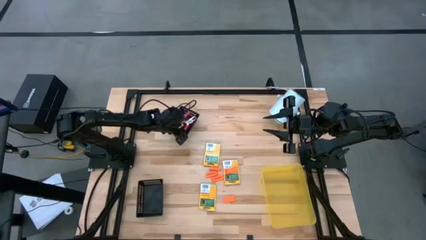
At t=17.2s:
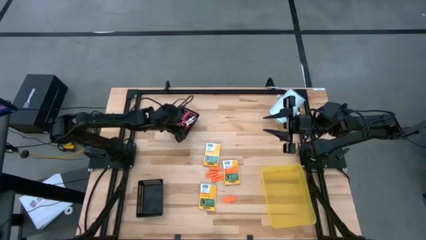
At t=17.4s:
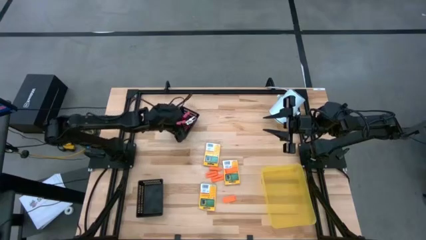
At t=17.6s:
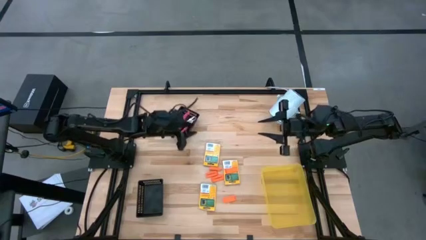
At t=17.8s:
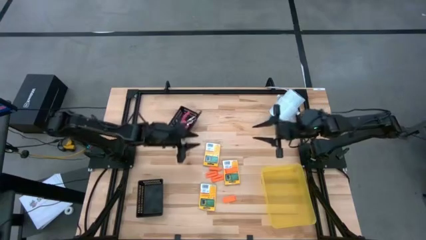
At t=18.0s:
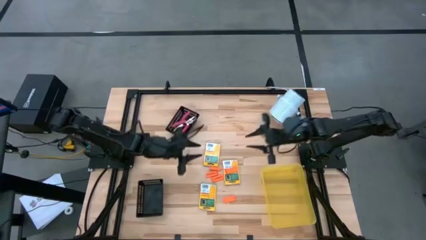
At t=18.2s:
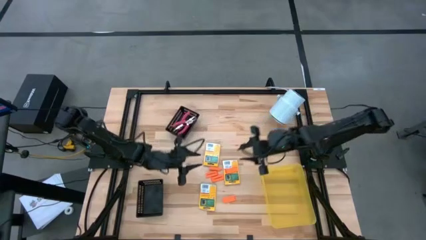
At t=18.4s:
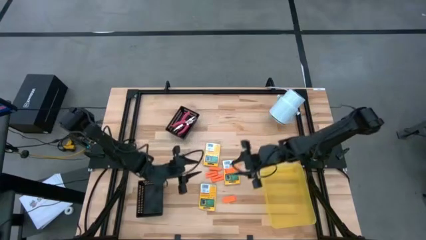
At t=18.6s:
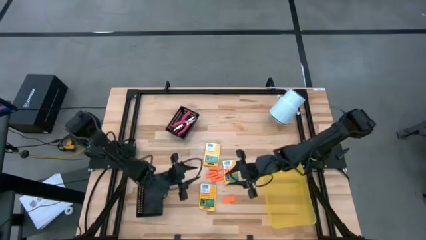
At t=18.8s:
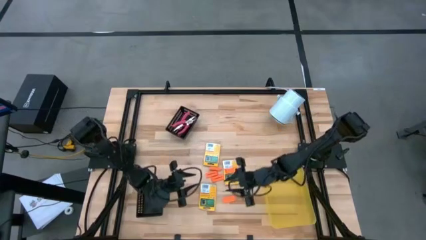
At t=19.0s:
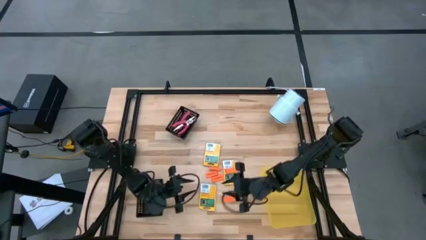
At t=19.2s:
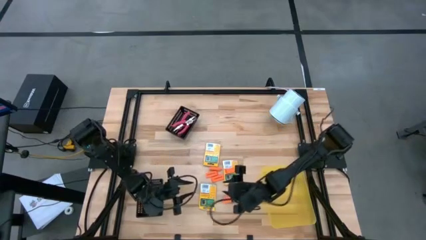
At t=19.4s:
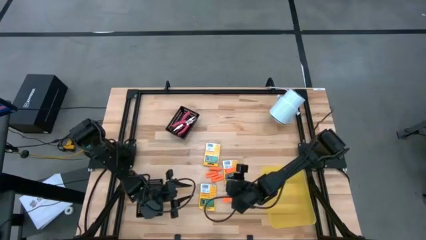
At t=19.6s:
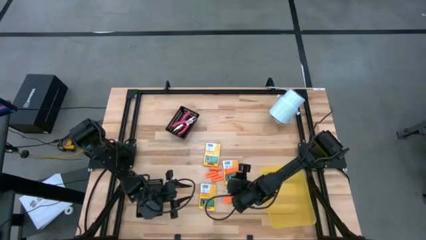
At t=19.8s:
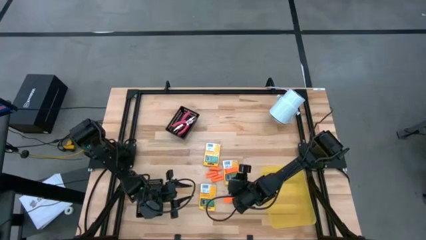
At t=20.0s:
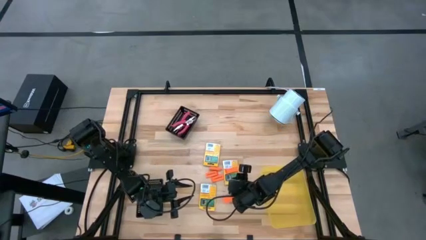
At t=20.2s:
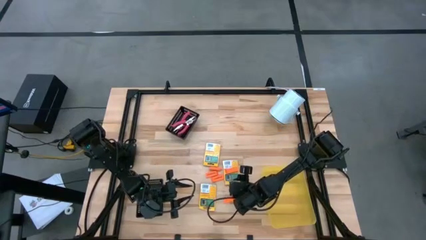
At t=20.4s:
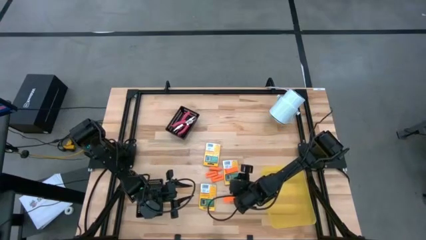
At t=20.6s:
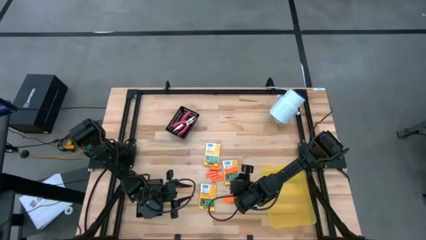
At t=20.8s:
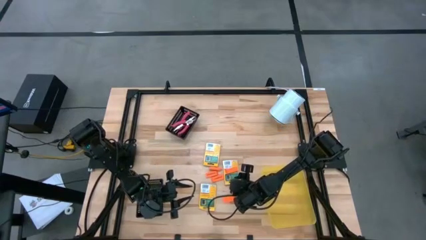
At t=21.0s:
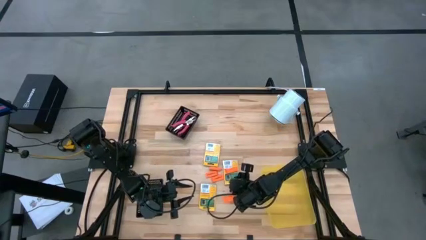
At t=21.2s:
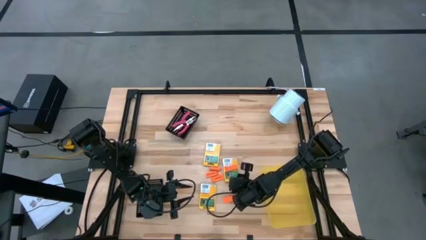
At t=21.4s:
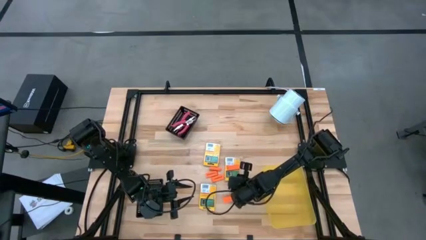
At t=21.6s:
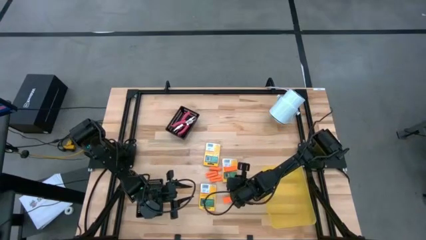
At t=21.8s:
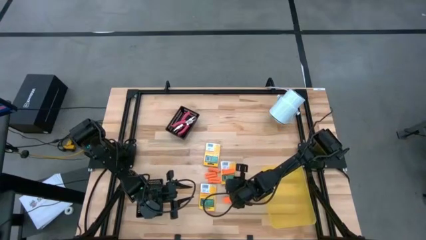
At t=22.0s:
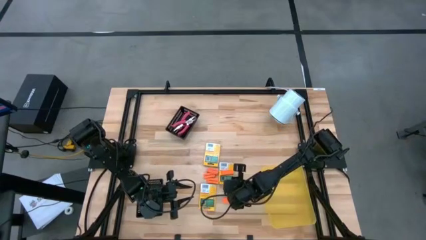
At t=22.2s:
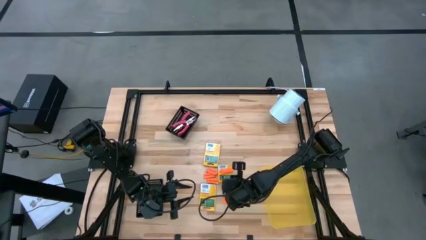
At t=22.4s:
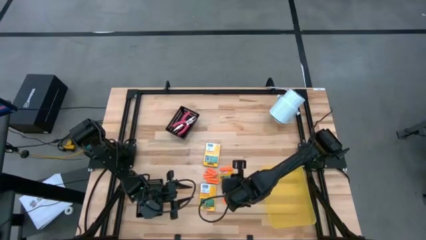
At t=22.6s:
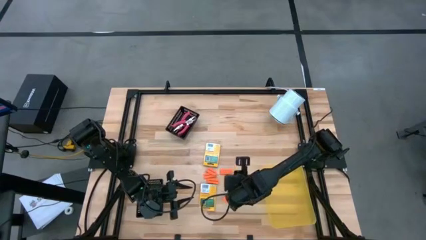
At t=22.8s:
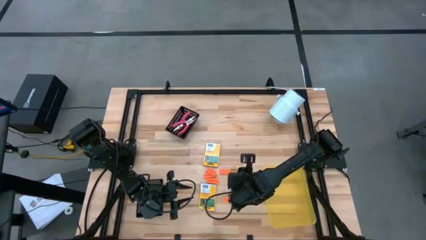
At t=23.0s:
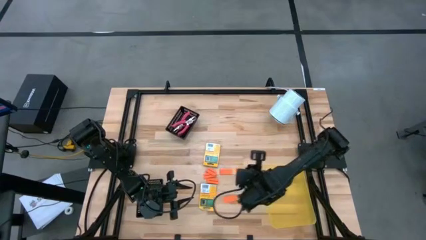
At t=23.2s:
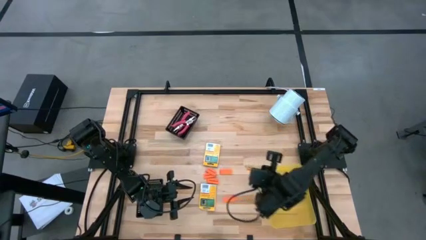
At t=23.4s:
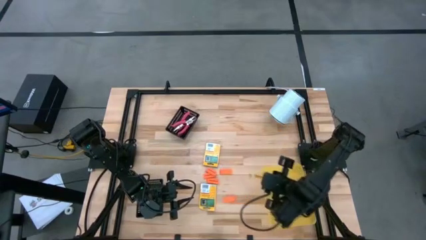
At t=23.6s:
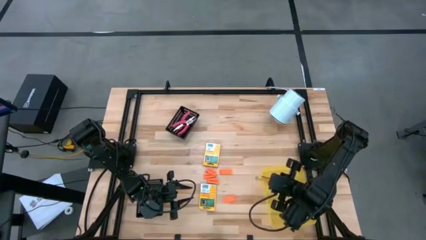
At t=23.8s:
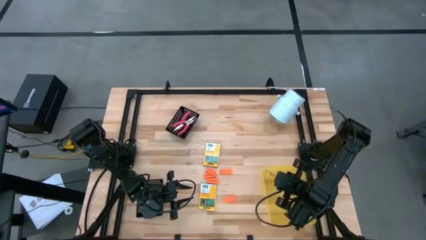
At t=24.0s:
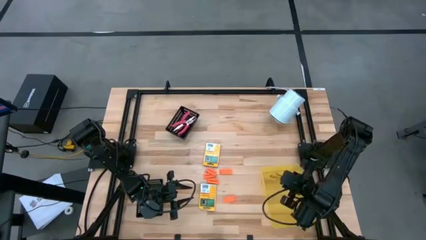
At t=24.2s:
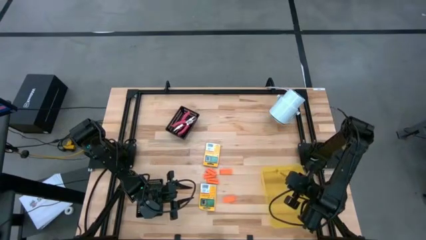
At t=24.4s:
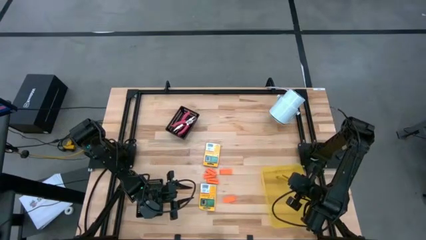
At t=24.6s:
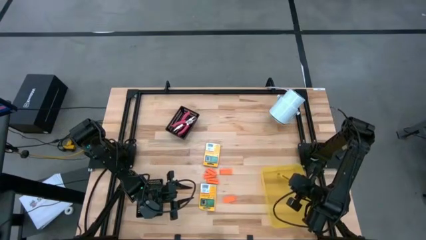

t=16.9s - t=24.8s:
Task: Pick & Place School Supplies
Put the yellow crayon box into the yellow basket

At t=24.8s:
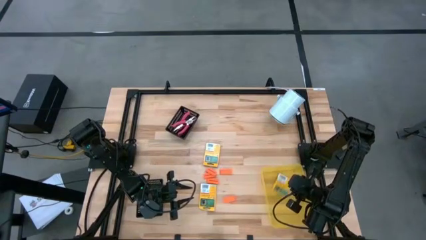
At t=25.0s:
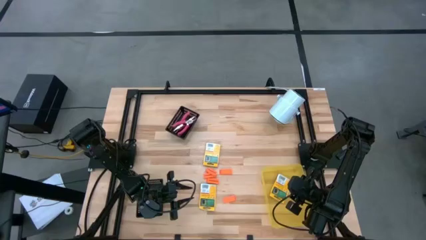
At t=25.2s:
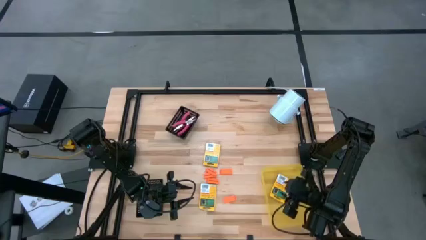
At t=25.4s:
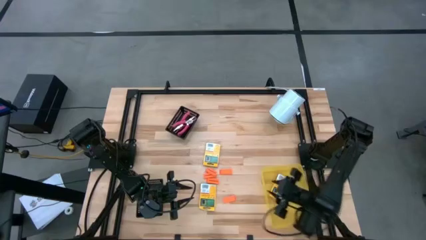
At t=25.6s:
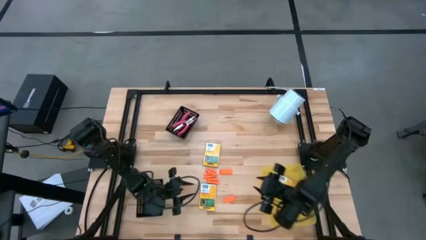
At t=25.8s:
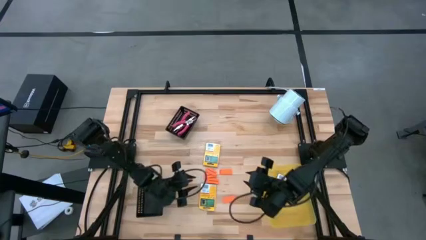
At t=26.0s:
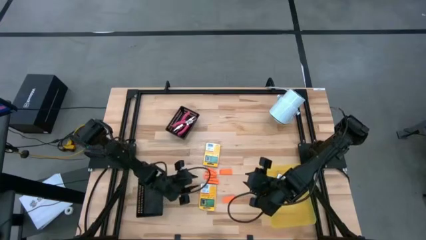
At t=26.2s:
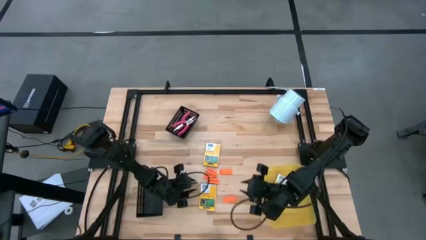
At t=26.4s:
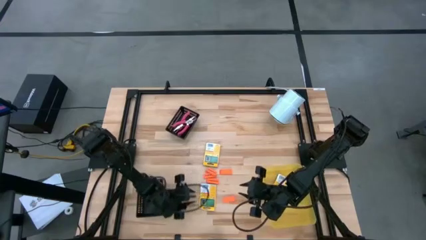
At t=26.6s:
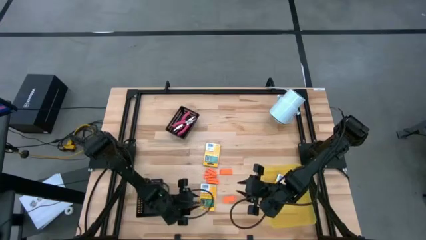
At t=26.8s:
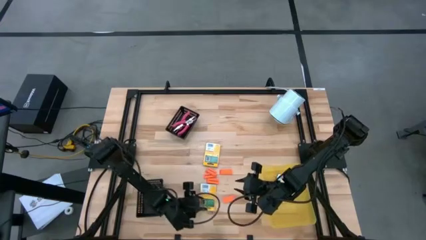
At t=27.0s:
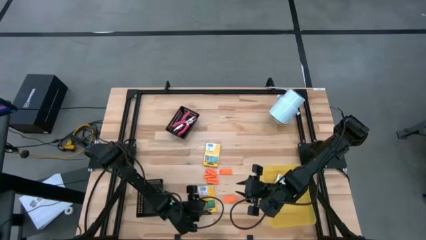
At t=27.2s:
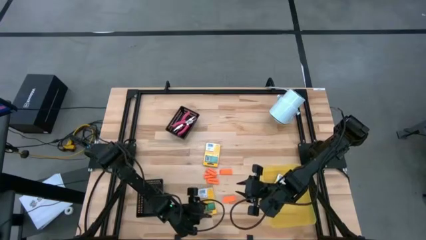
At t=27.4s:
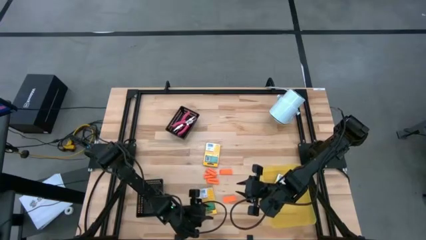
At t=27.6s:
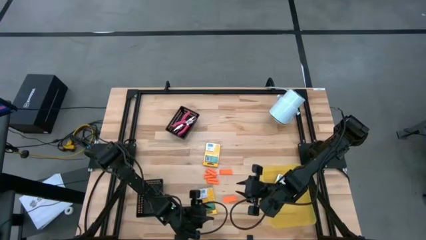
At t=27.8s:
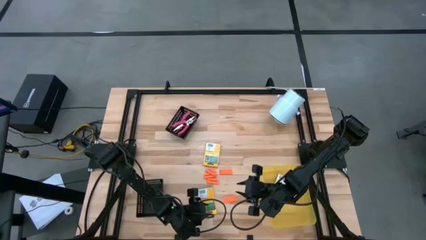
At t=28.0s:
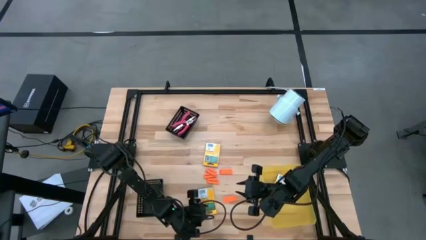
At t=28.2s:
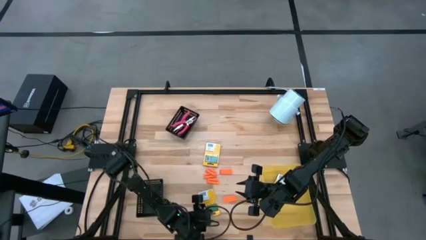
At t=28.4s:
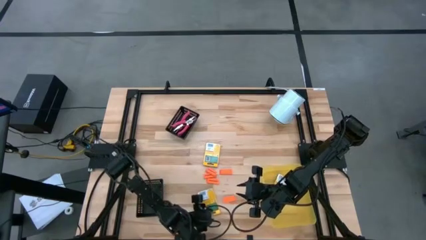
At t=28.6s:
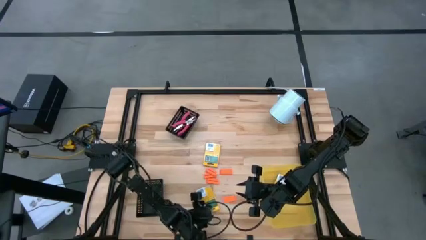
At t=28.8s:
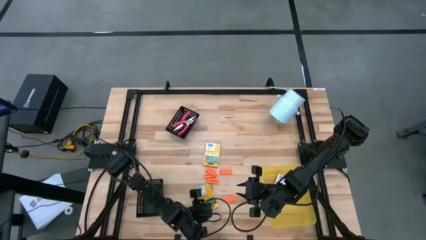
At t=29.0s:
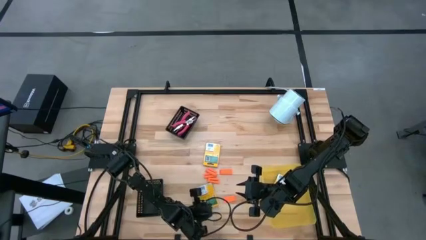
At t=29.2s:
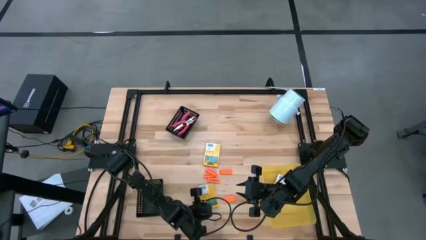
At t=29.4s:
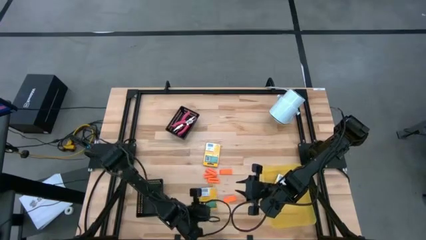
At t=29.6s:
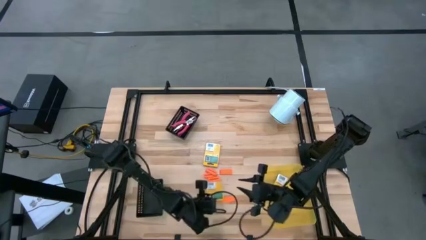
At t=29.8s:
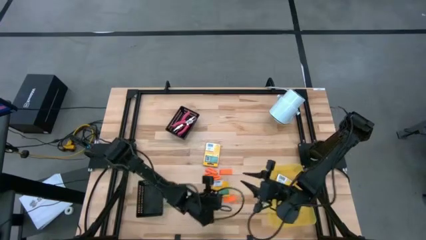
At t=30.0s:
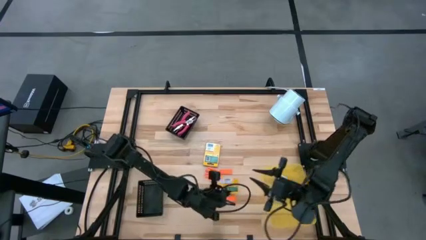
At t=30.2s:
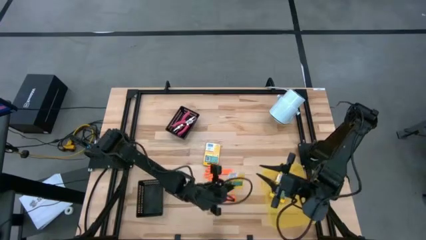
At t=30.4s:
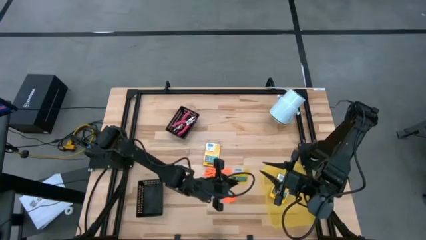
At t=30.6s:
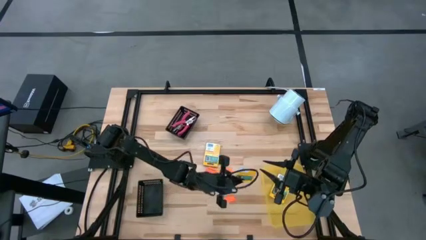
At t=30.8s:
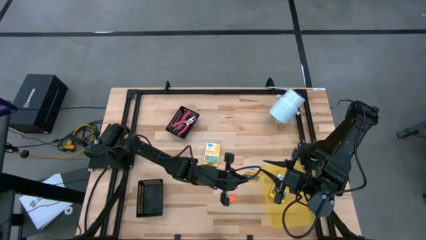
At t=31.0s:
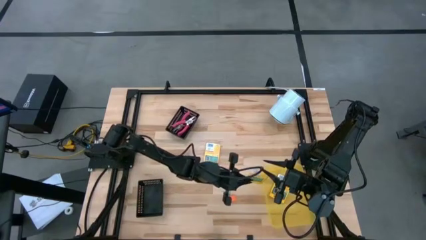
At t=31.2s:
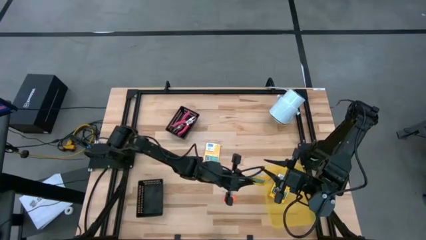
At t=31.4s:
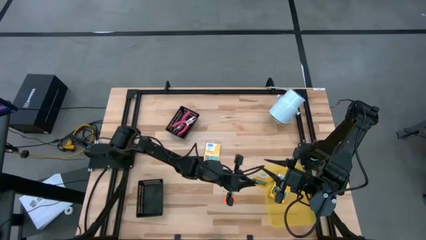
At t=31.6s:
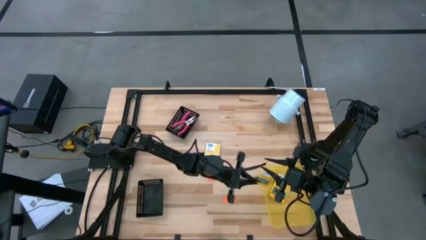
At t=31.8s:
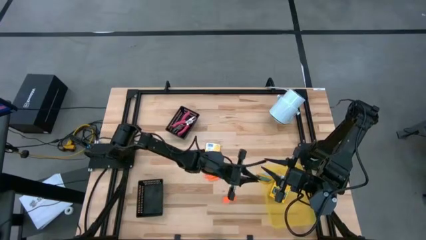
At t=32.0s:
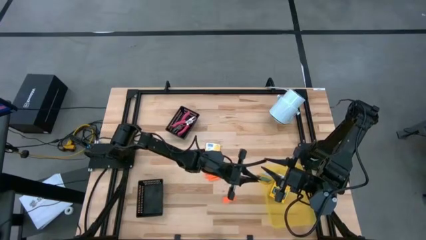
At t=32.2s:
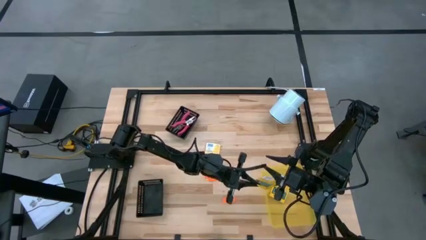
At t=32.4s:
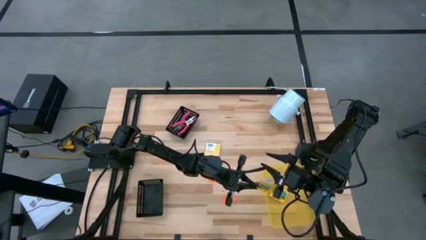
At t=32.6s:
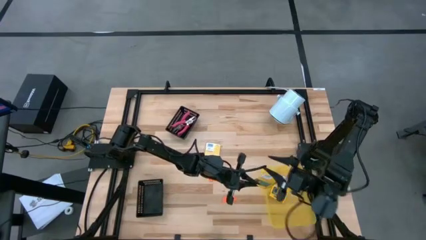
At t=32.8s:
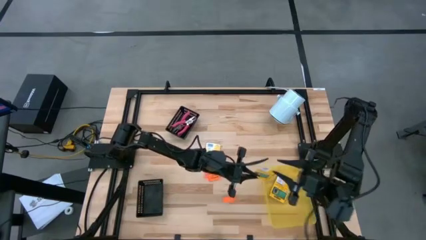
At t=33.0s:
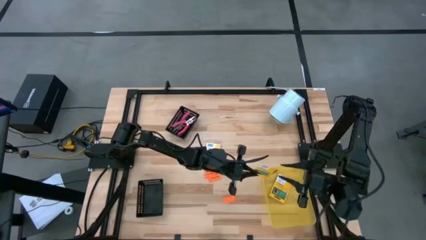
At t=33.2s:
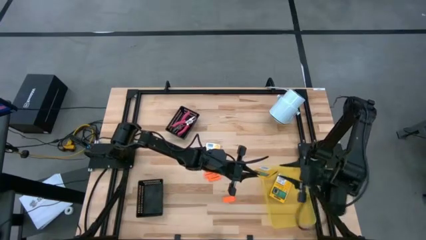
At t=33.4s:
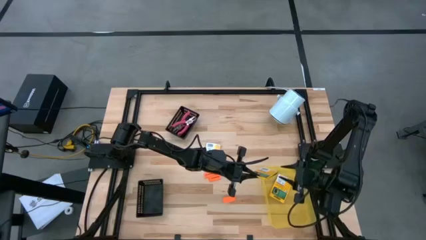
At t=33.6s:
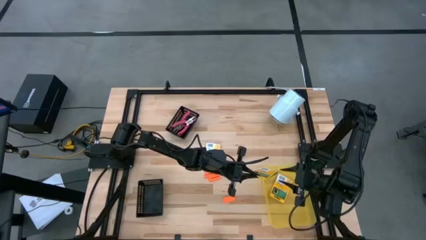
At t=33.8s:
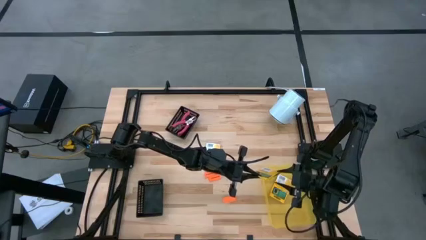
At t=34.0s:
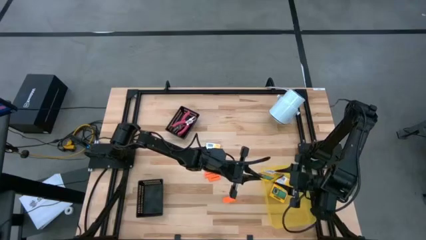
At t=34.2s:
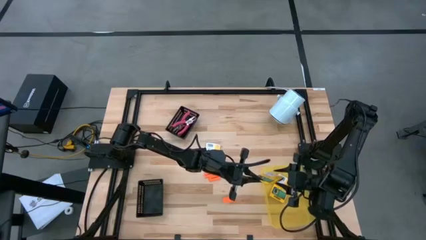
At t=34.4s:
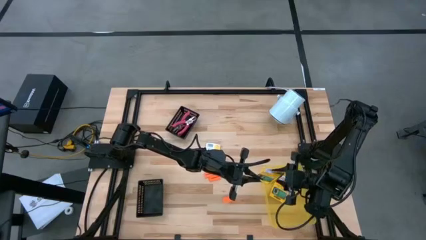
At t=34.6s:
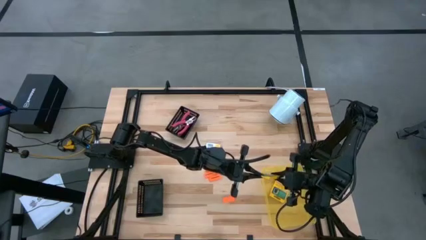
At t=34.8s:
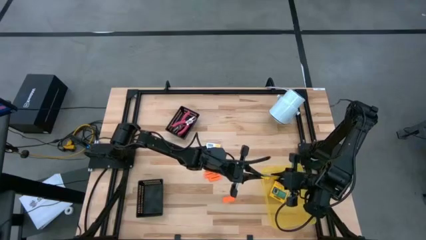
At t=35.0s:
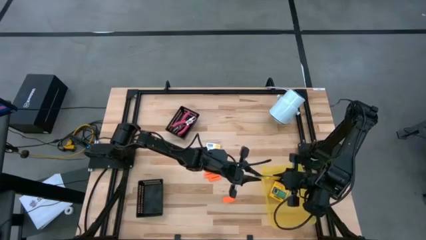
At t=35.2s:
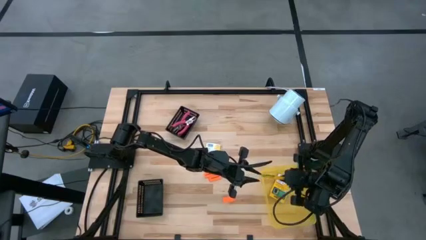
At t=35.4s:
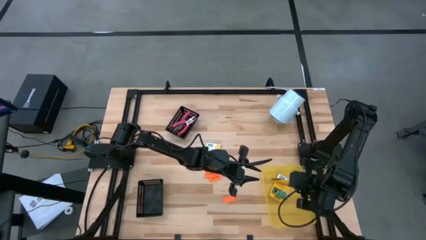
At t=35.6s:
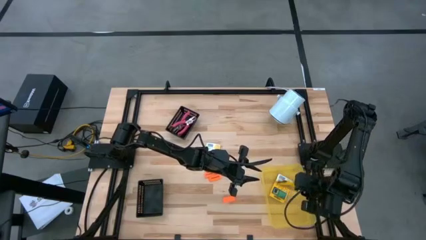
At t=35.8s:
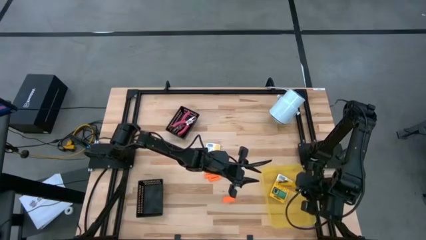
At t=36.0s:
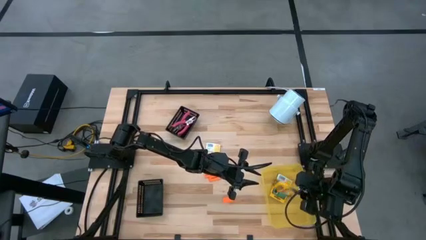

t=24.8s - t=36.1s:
Put the yellow crayon box into the yellow basket
